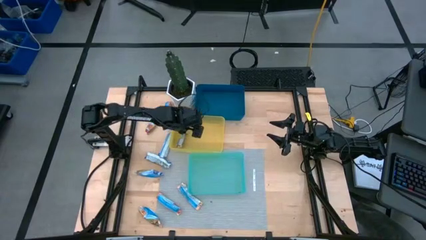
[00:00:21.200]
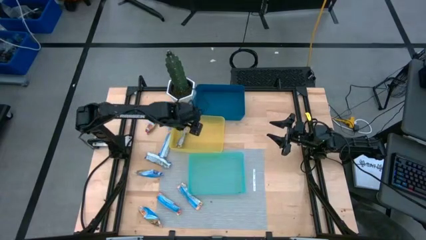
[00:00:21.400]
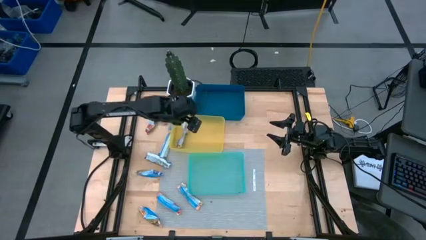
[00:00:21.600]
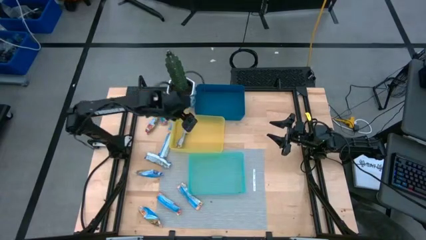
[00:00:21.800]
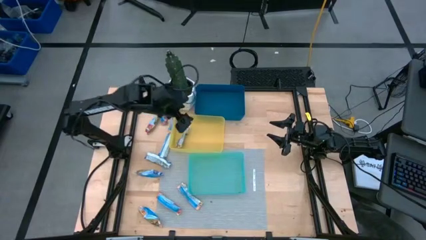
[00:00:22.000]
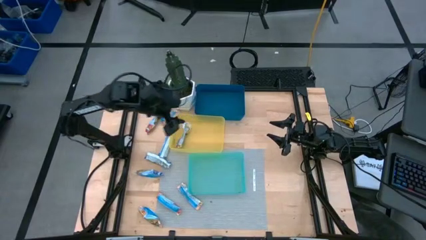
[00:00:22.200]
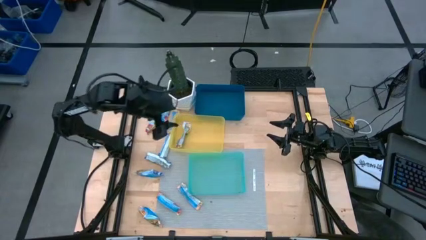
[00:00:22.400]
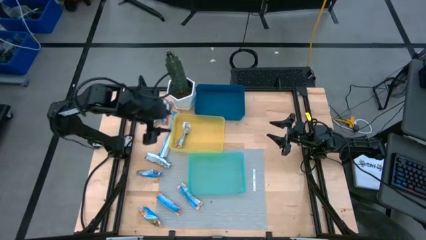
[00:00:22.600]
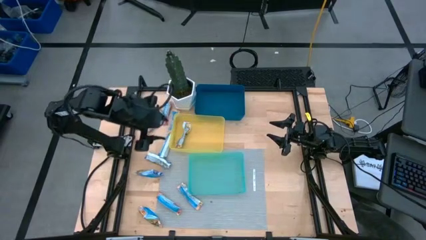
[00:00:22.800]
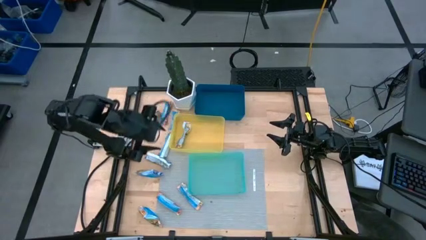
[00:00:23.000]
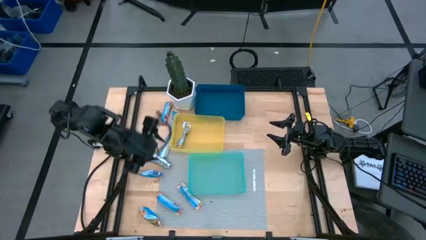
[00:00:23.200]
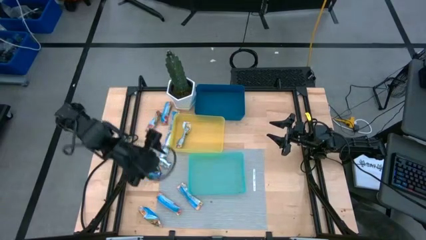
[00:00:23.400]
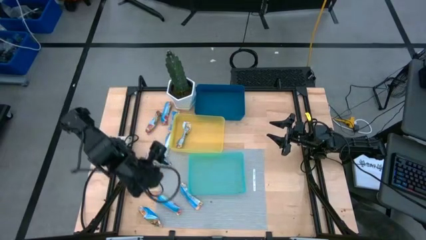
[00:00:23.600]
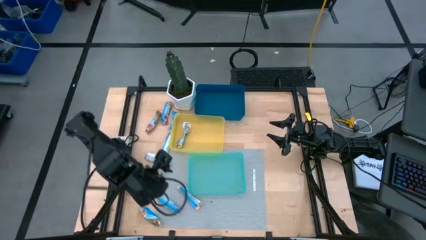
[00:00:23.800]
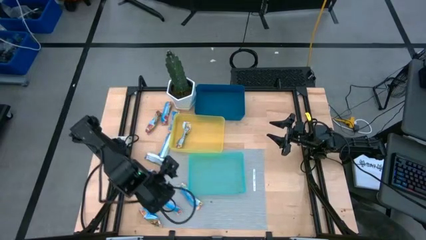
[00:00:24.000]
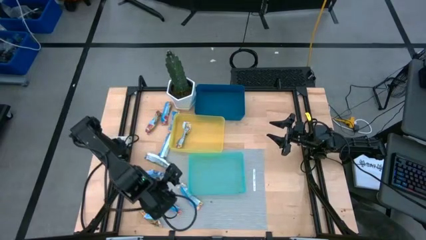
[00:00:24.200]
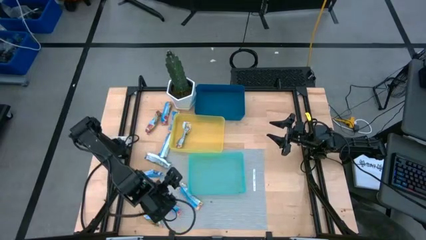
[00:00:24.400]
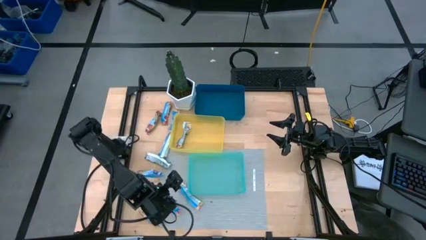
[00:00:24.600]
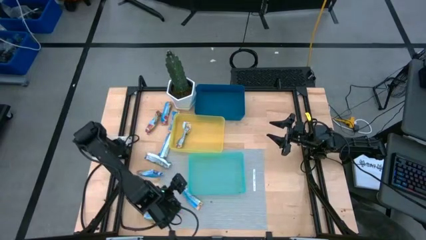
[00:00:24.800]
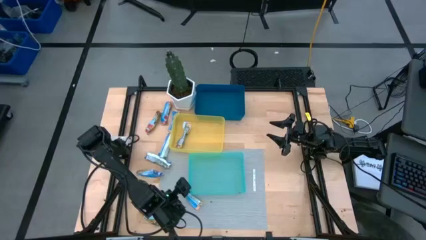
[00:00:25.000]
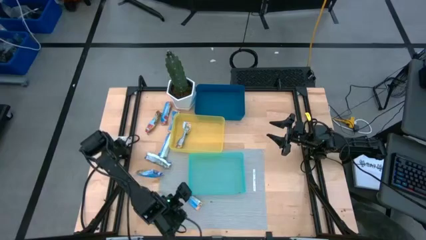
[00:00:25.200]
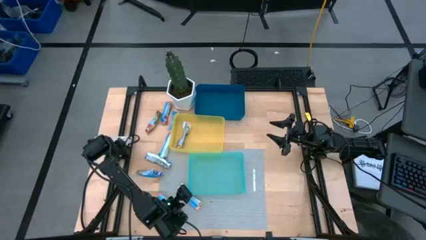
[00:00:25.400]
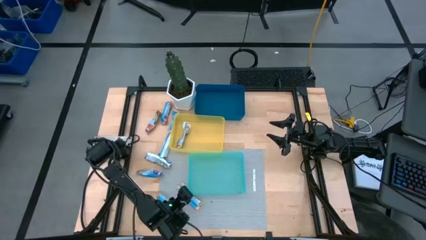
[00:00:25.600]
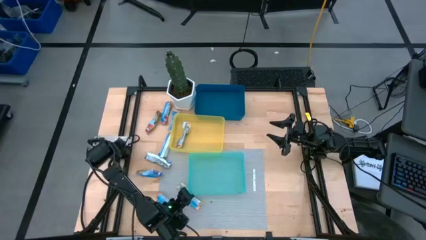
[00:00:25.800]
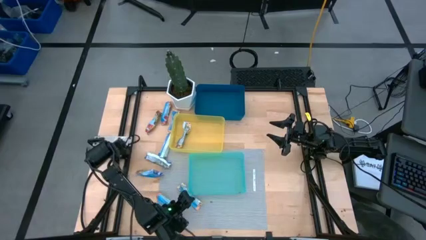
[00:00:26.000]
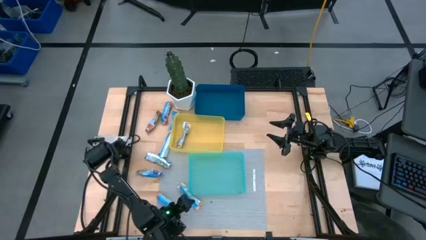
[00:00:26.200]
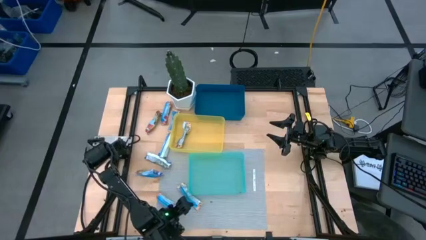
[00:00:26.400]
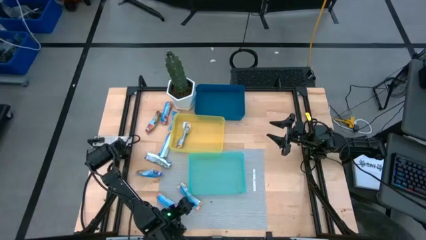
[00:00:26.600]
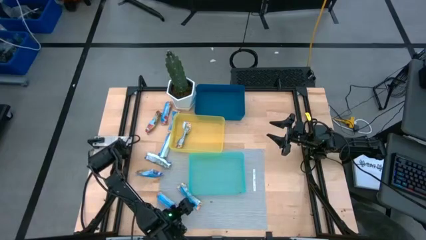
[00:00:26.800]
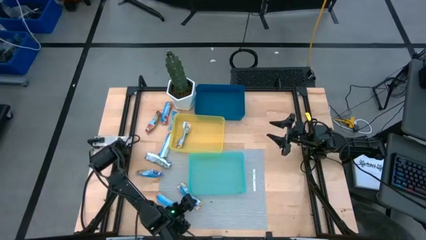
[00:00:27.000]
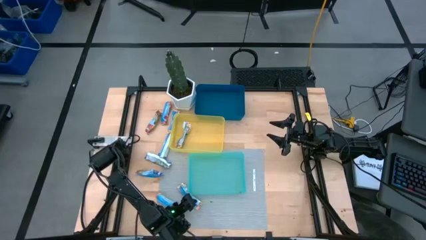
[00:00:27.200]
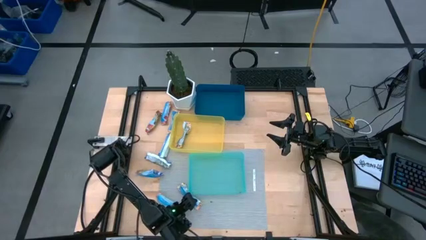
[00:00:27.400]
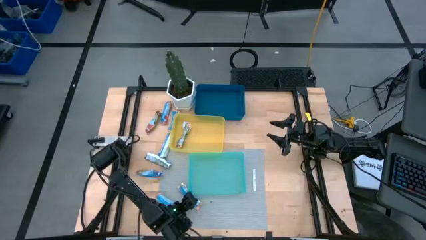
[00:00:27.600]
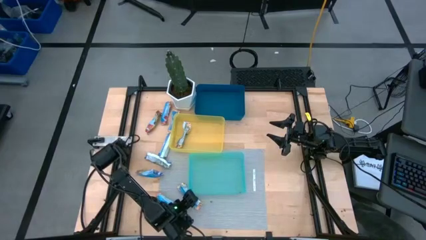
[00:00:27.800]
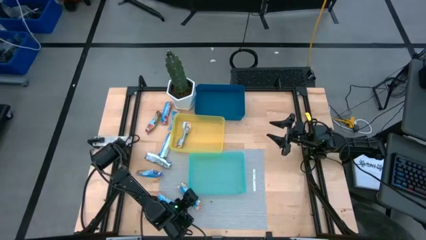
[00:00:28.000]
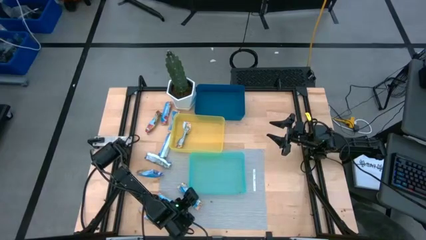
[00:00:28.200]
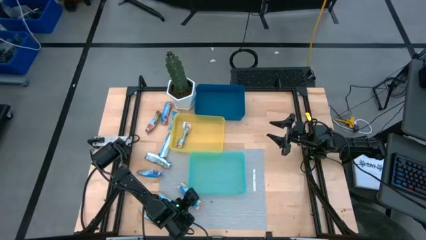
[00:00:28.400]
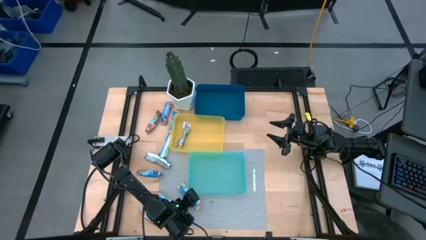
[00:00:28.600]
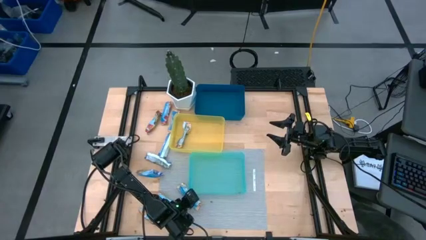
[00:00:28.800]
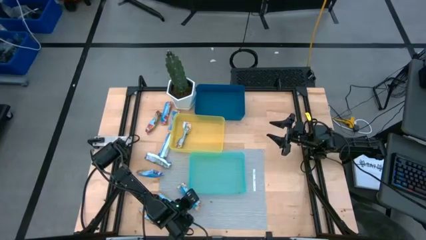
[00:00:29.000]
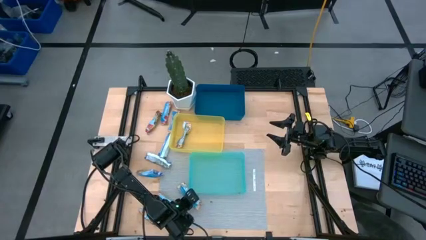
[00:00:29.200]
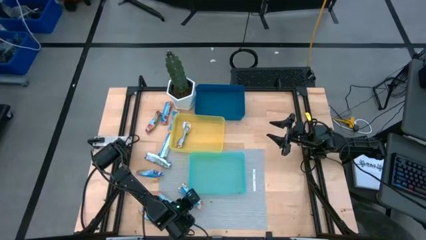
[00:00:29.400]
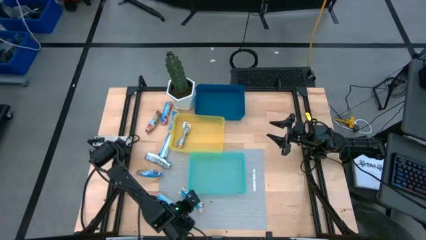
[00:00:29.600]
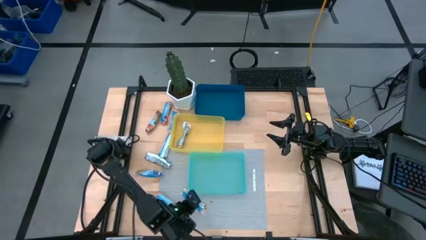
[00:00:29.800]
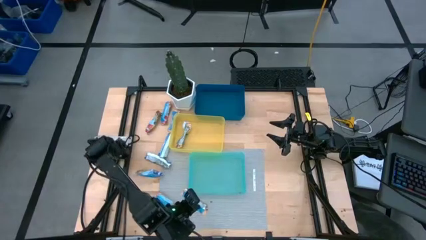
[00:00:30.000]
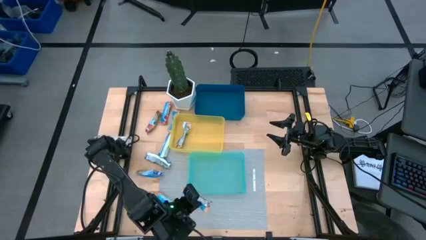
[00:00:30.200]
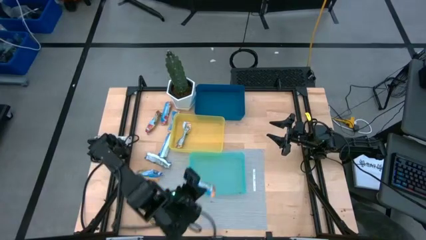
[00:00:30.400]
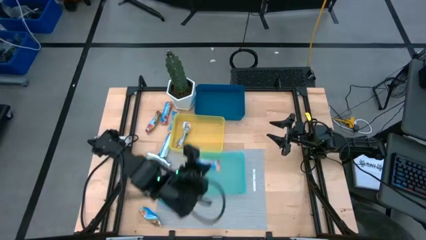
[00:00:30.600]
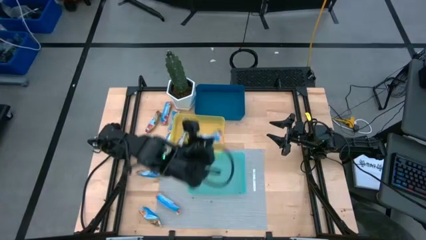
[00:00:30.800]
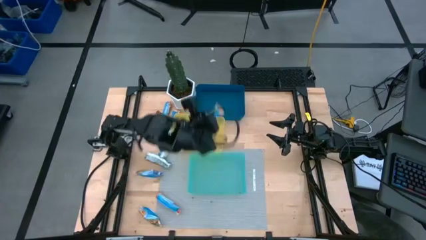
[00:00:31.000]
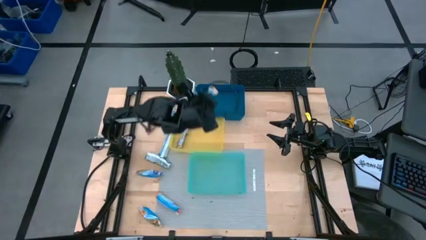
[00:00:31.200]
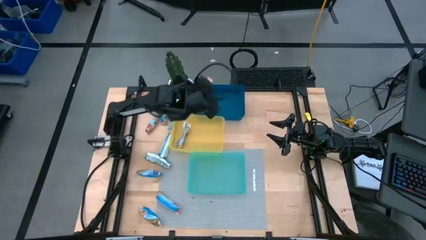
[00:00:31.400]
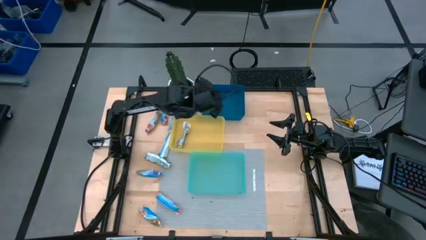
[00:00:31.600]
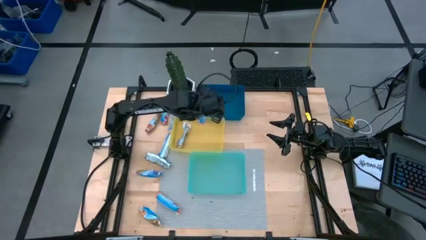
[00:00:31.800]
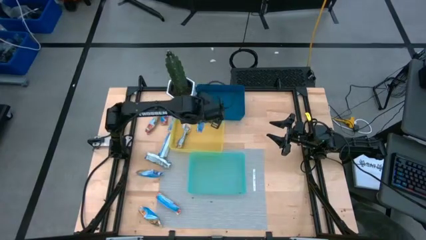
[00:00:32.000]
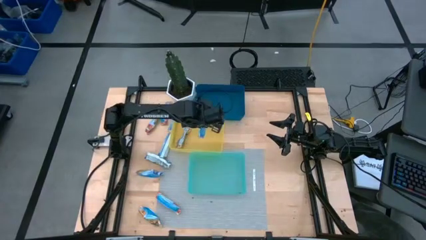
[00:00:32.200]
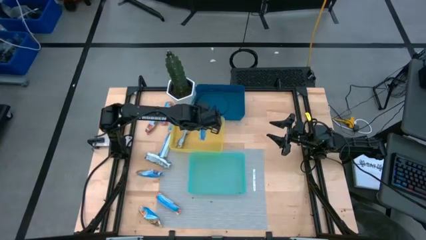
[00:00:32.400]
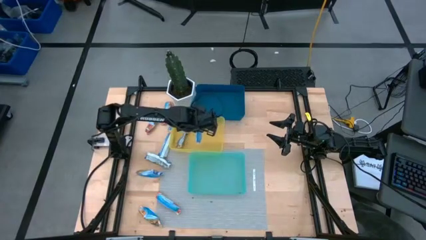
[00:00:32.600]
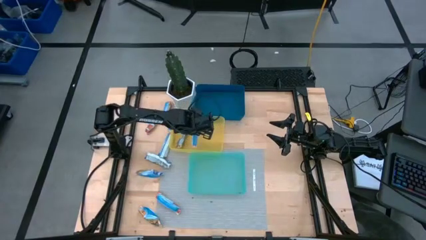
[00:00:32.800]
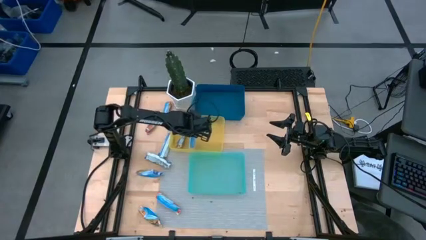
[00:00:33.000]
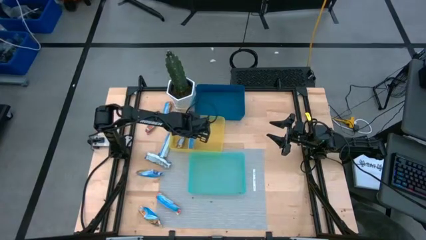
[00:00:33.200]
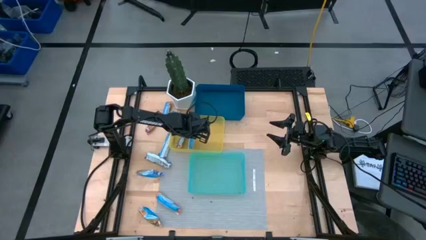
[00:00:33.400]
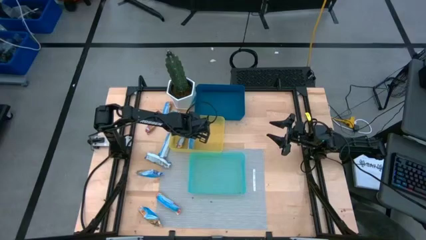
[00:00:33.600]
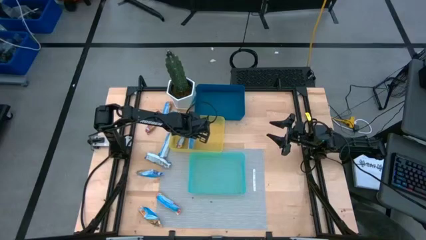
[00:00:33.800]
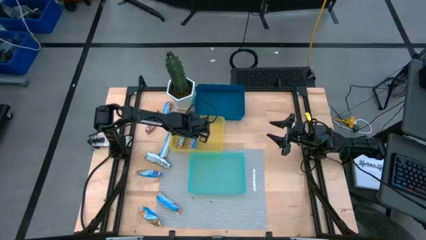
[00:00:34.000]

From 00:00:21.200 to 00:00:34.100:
Task: Pick and place Granola Bars by type
Put the yellow granola bar into the yellow bin
